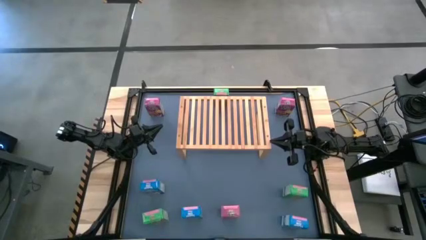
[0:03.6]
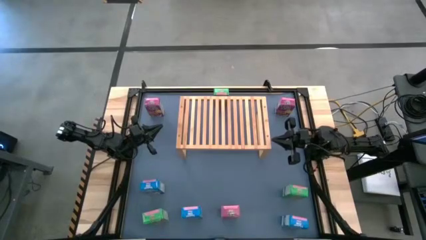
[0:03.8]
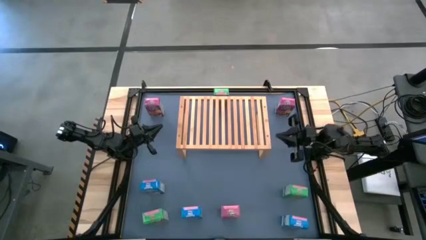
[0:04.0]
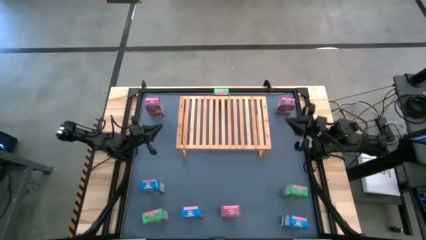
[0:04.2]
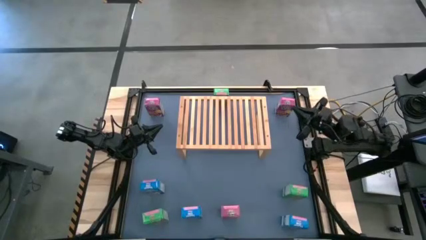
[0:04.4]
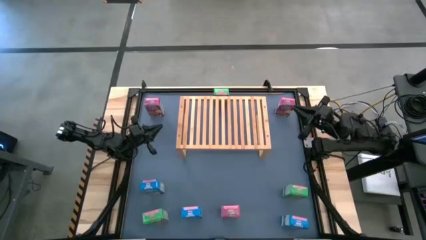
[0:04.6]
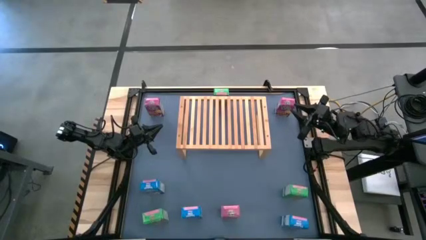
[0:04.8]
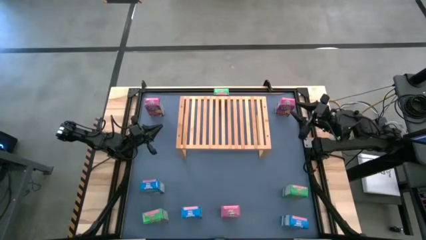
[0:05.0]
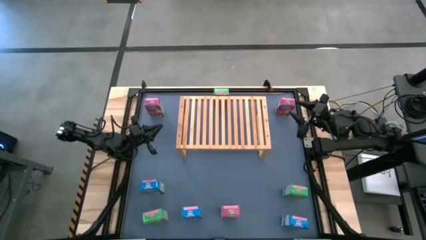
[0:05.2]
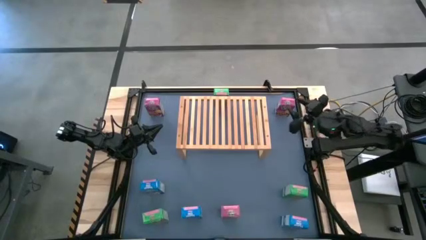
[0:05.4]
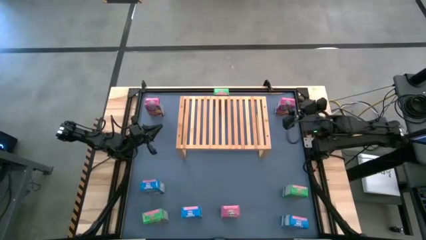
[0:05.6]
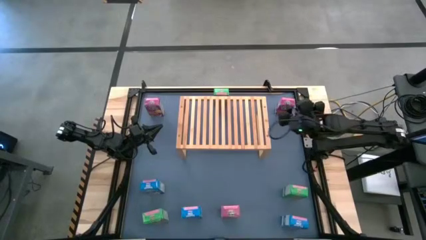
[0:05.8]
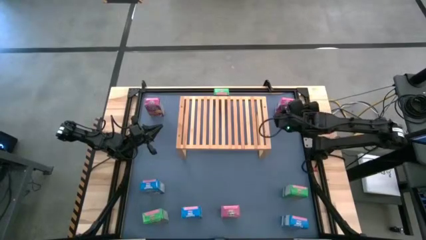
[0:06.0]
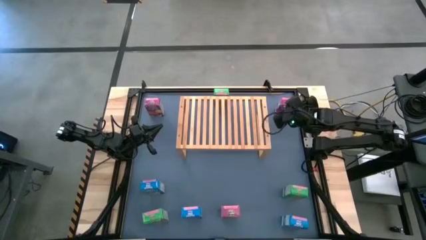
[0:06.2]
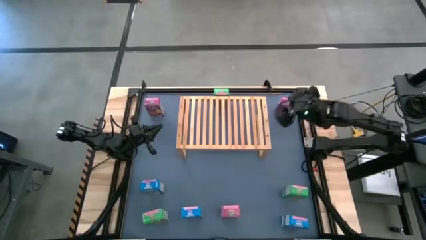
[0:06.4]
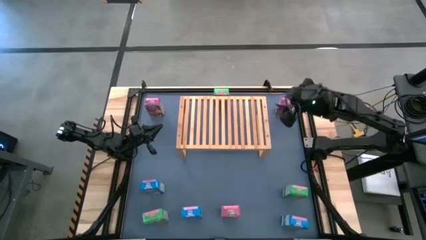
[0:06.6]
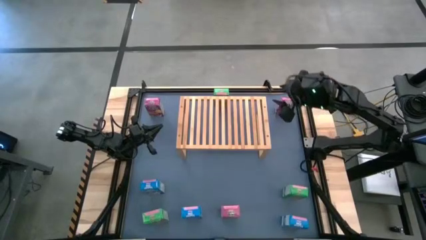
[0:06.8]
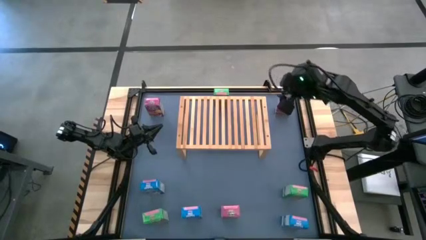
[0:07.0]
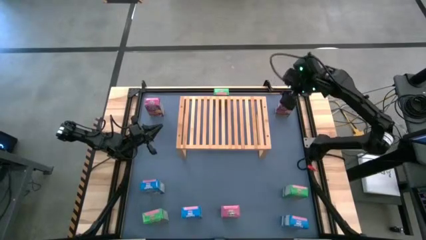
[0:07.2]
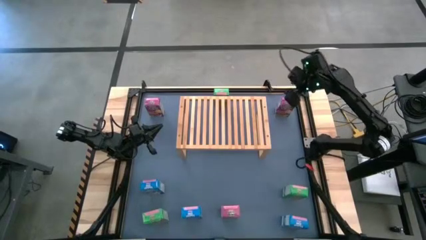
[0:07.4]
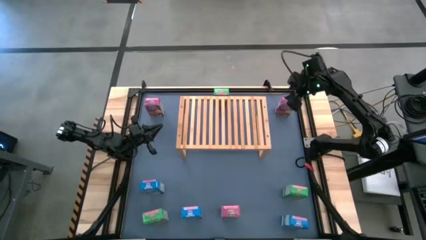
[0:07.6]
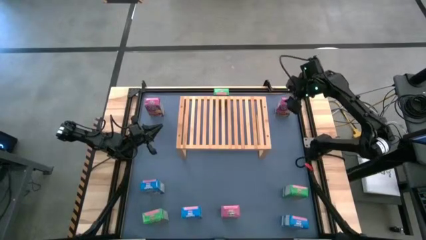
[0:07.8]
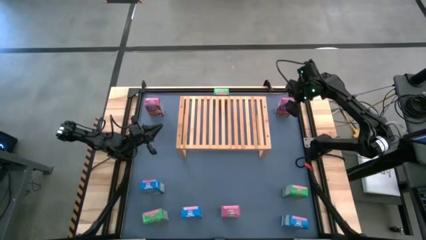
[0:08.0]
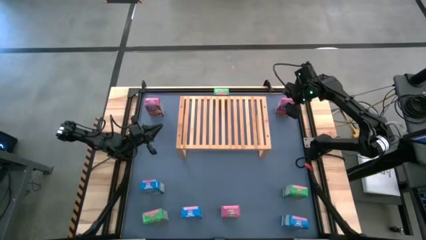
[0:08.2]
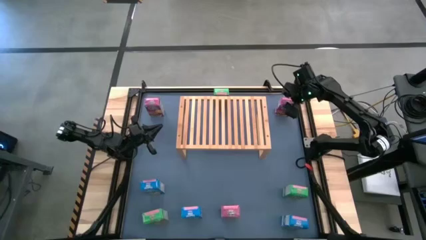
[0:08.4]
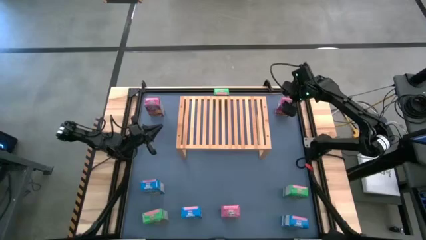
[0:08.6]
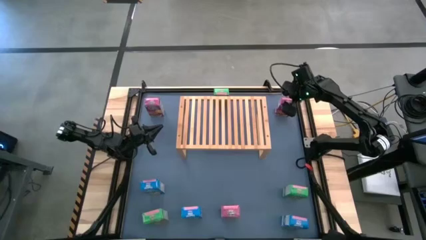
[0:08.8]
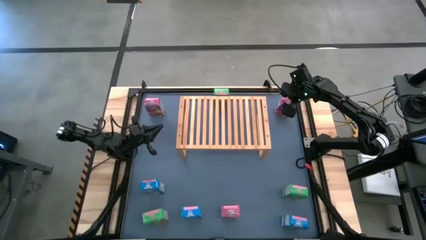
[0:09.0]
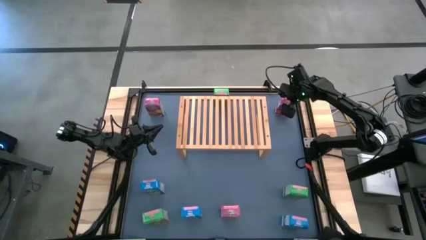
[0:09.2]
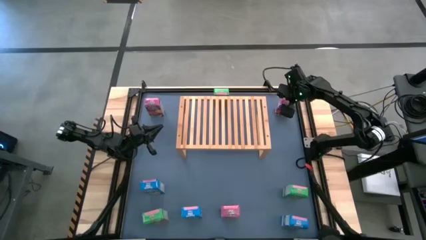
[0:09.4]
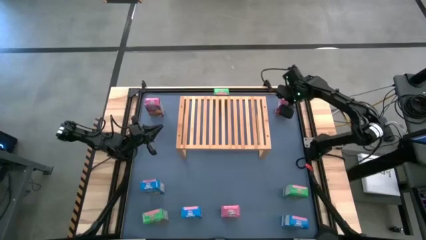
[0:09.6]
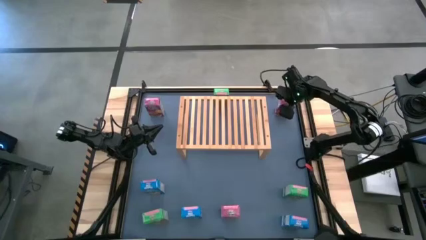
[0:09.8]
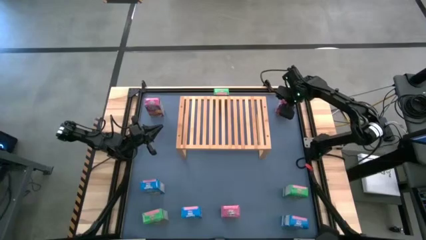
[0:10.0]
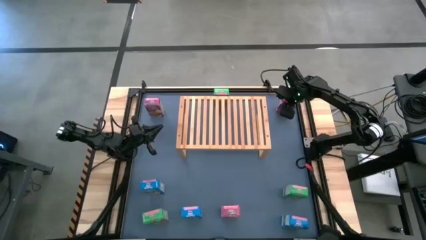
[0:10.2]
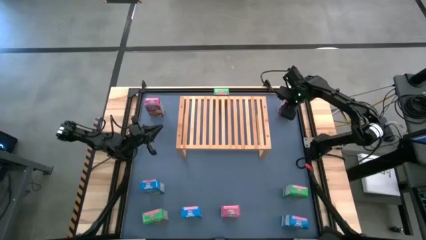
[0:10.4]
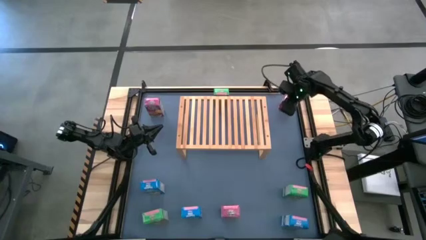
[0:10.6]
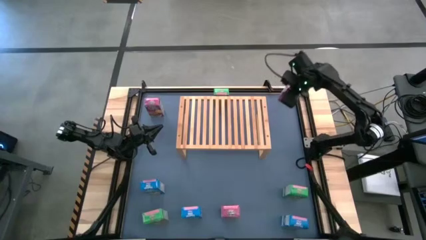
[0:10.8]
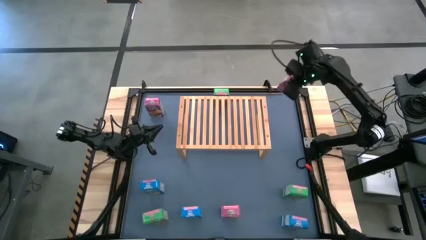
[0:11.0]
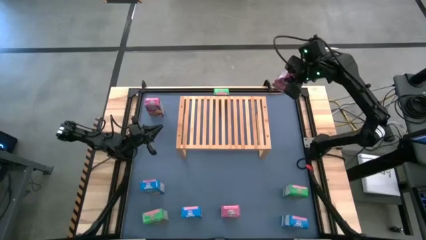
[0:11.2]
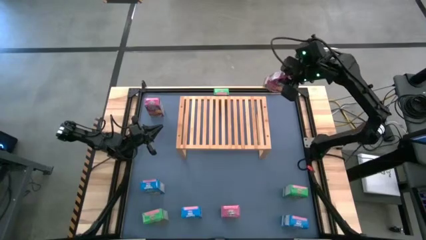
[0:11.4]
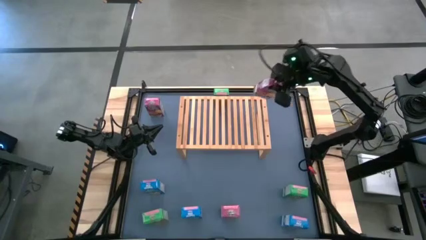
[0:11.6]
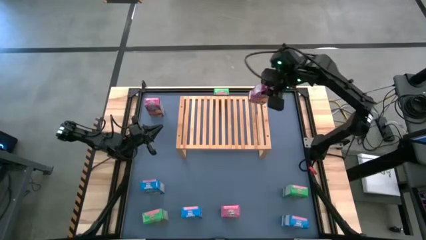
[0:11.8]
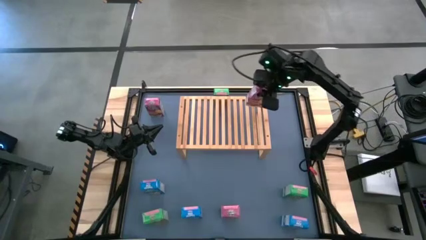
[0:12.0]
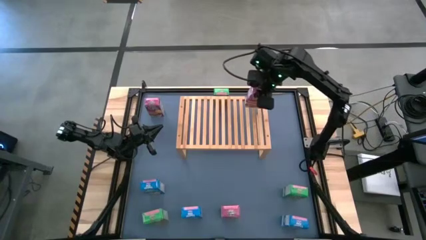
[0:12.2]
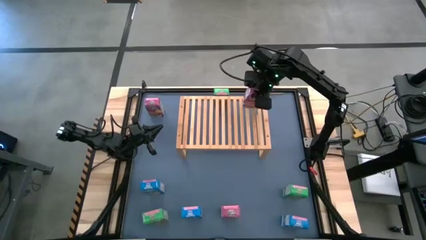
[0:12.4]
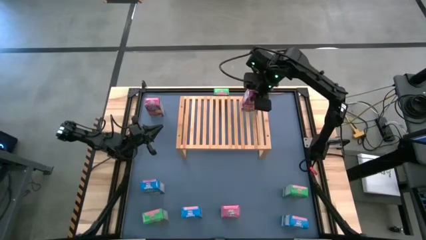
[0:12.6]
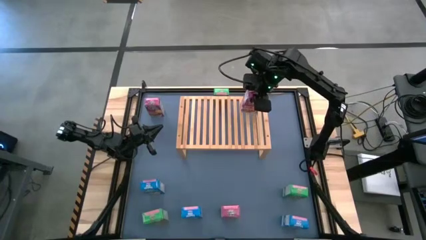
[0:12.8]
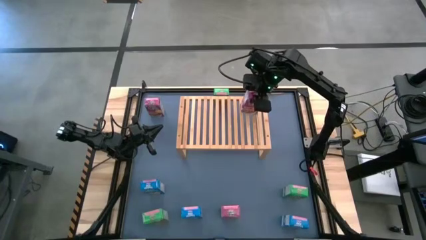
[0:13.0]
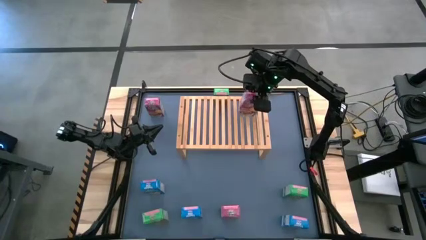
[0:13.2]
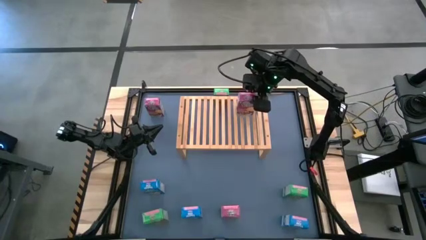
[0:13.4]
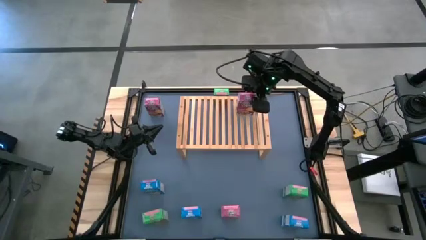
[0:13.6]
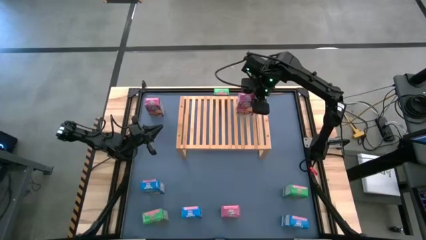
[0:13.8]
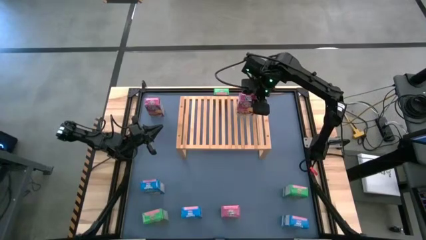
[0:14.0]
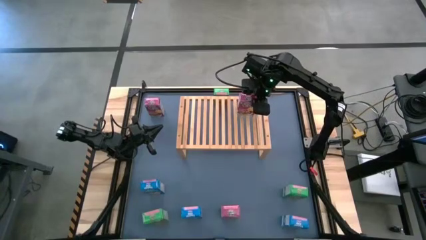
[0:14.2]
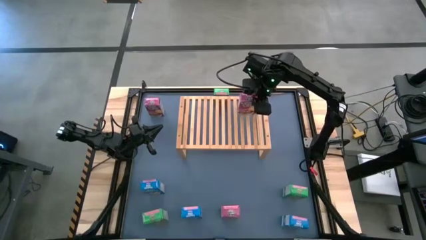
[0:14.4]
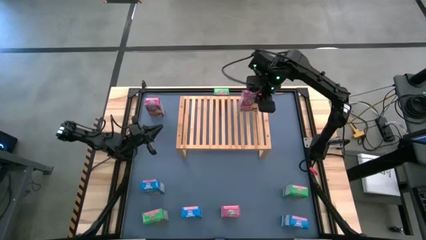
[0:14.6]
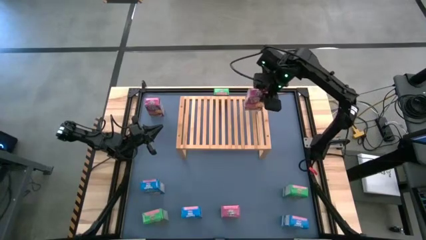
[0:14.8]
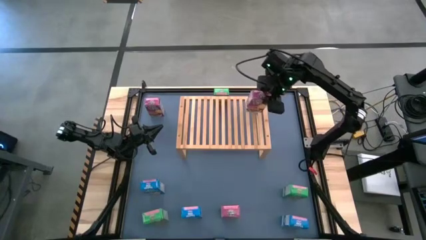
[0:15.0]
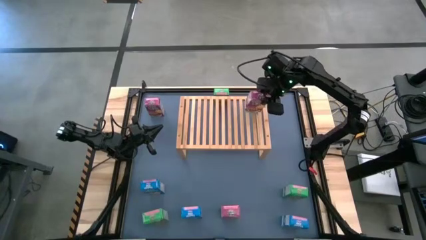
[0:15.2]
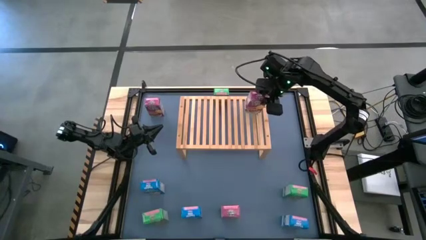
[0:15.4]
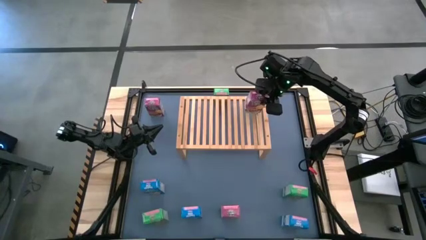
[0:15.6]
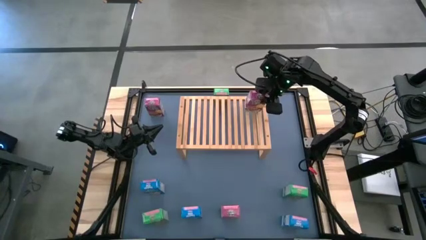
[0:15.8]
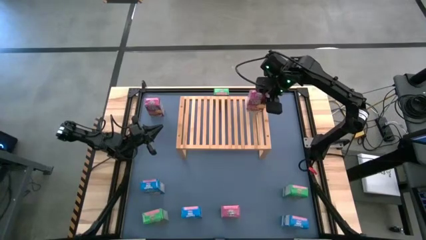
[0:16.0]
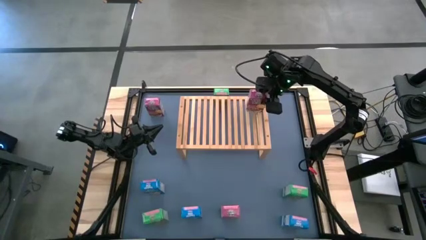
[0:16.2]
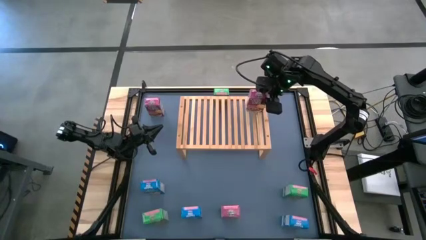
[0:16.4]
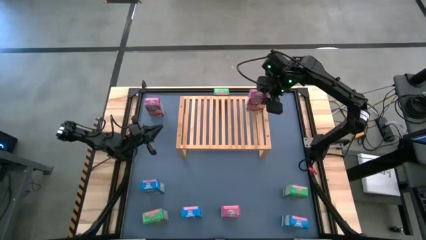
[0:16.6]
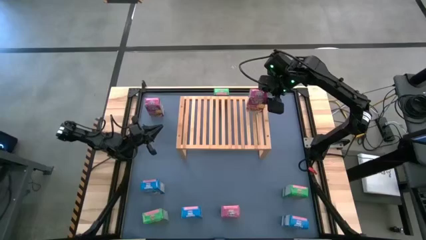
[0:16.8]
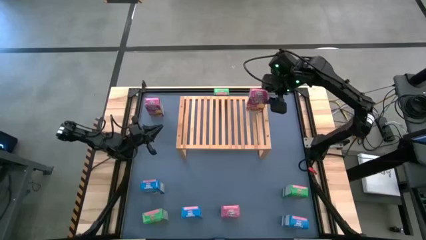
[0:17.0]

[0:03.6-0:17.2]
Task: Stack cereal on shelf
Put the top right pink cereal box on the shelf
